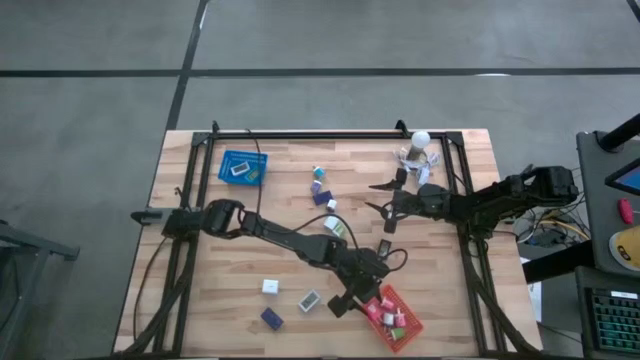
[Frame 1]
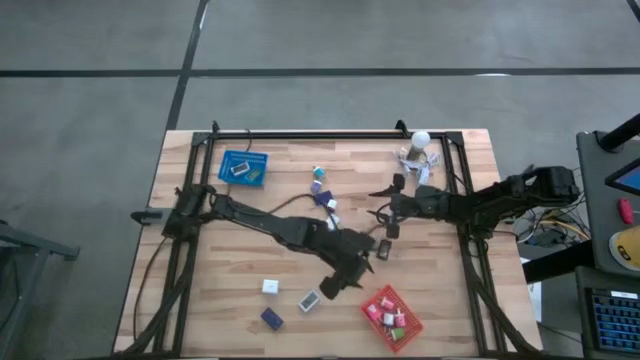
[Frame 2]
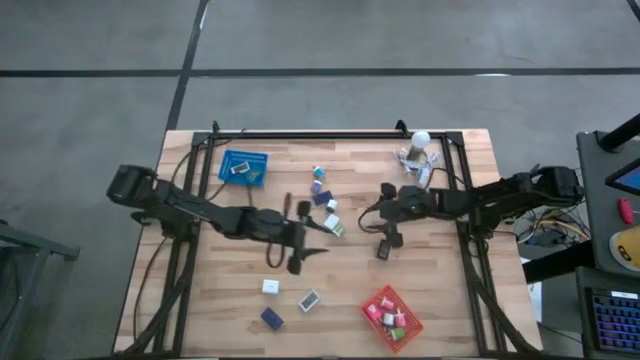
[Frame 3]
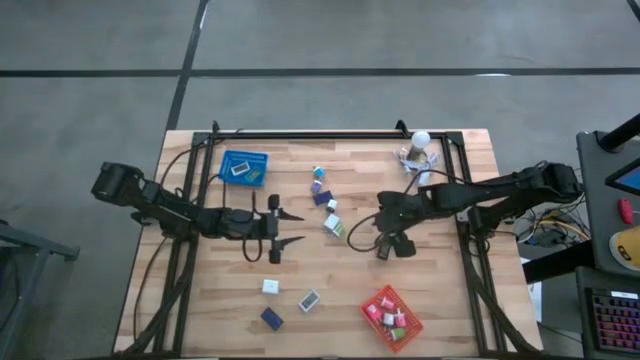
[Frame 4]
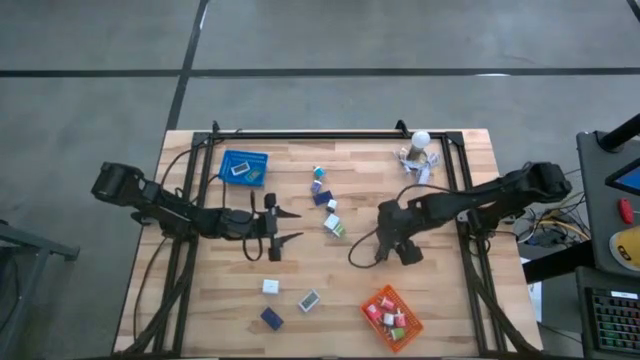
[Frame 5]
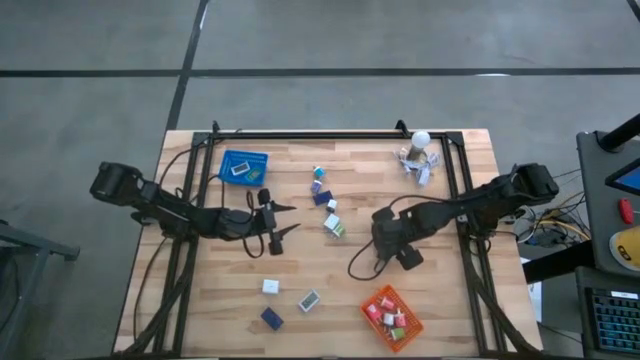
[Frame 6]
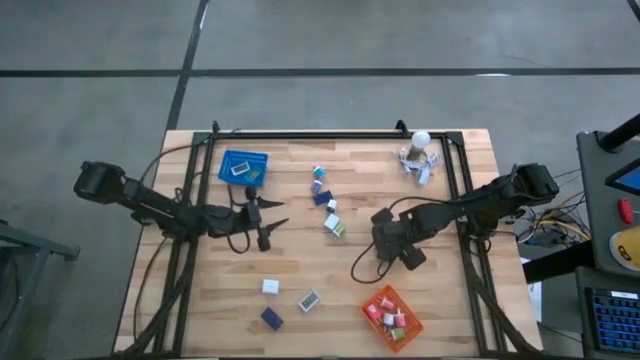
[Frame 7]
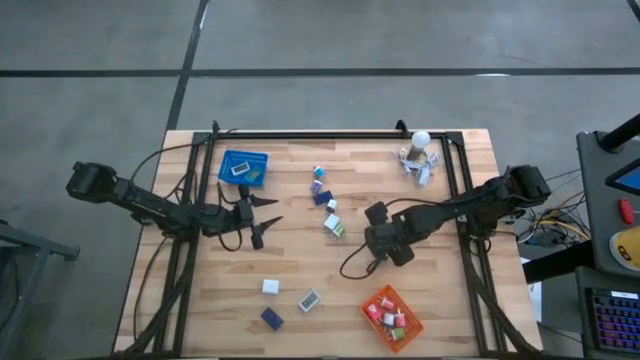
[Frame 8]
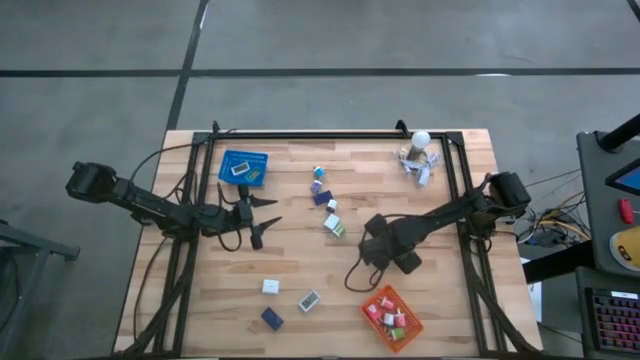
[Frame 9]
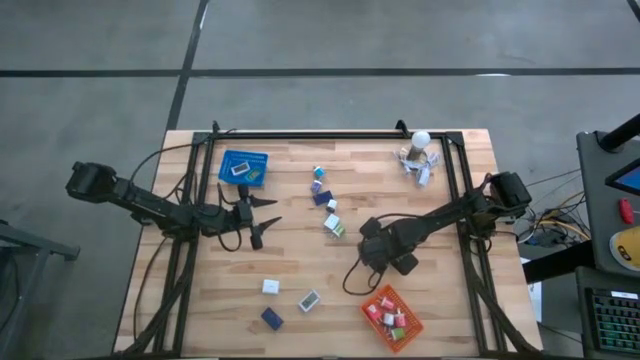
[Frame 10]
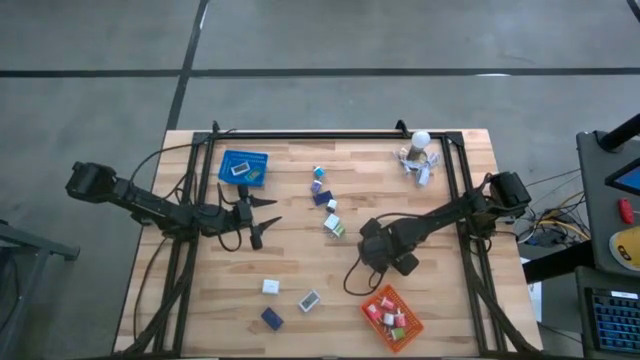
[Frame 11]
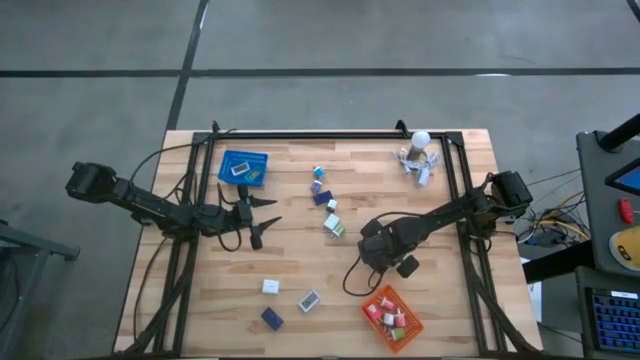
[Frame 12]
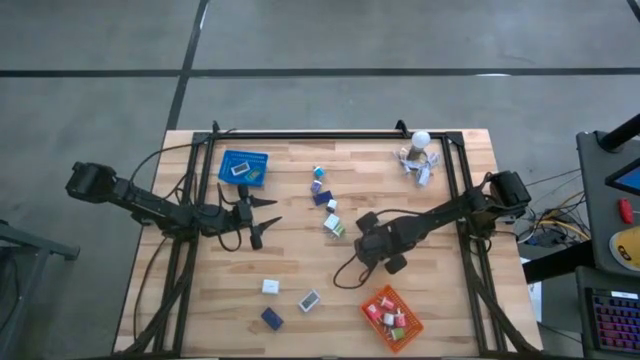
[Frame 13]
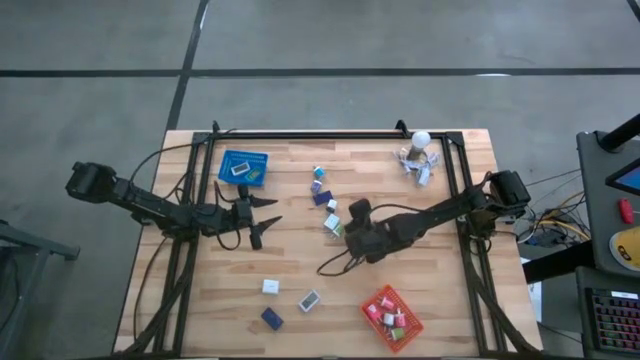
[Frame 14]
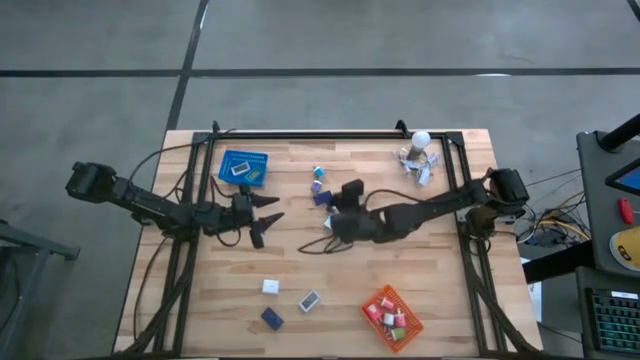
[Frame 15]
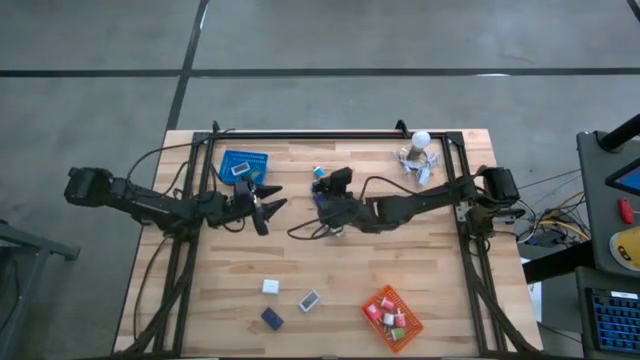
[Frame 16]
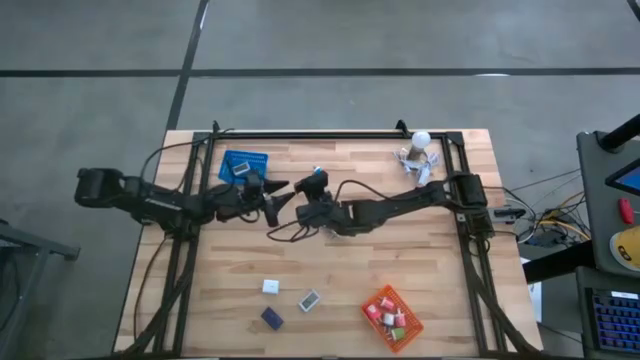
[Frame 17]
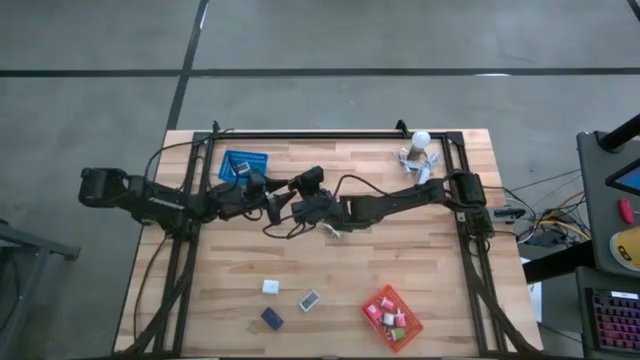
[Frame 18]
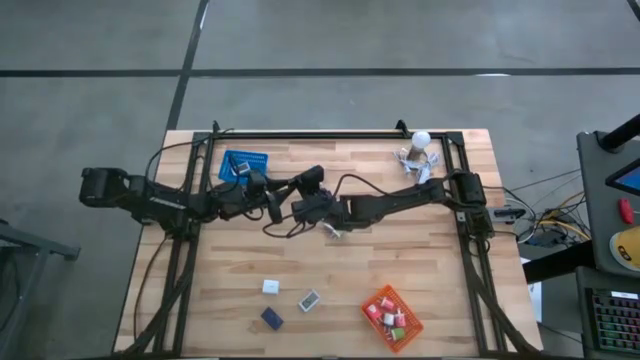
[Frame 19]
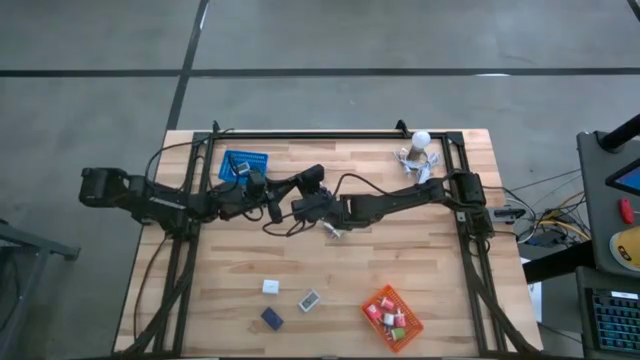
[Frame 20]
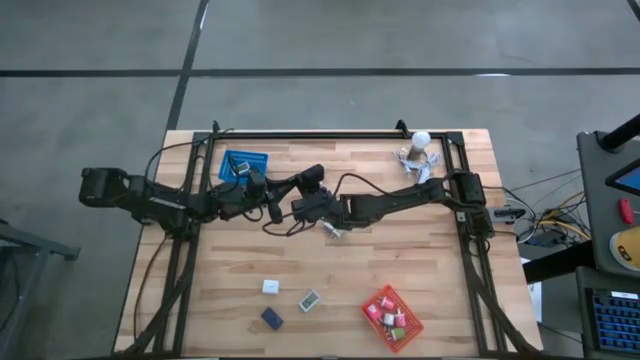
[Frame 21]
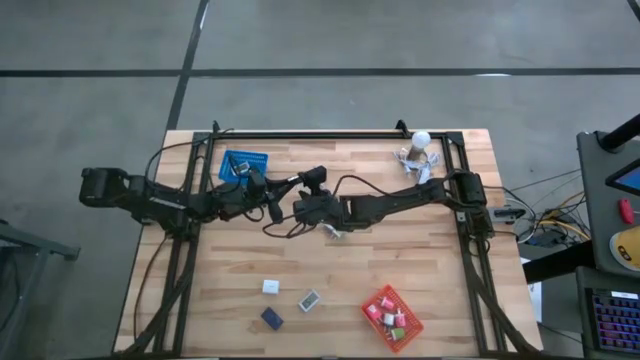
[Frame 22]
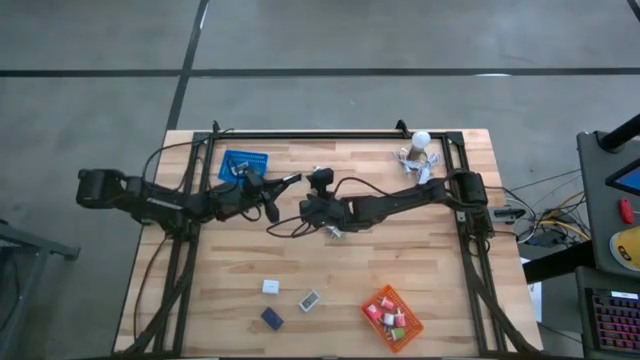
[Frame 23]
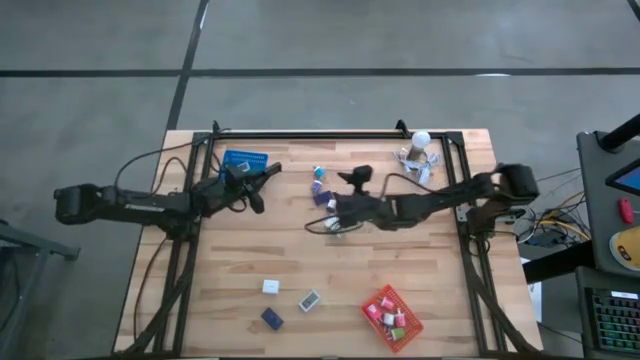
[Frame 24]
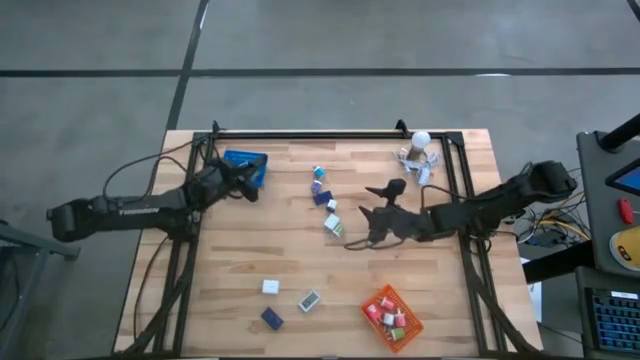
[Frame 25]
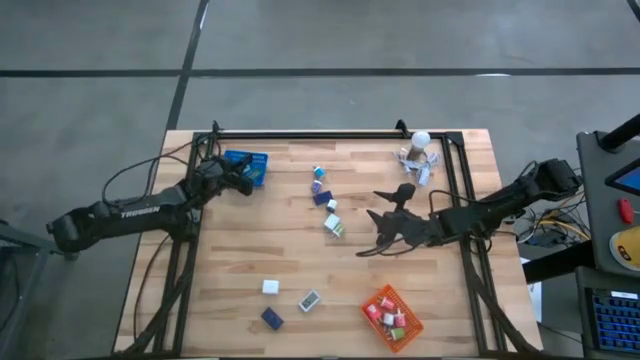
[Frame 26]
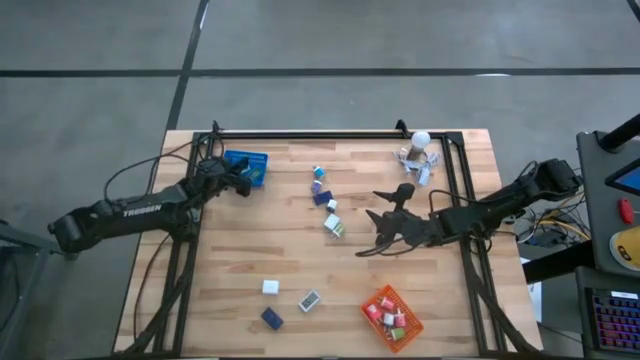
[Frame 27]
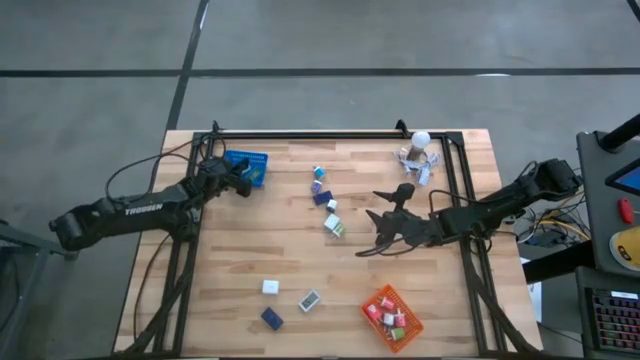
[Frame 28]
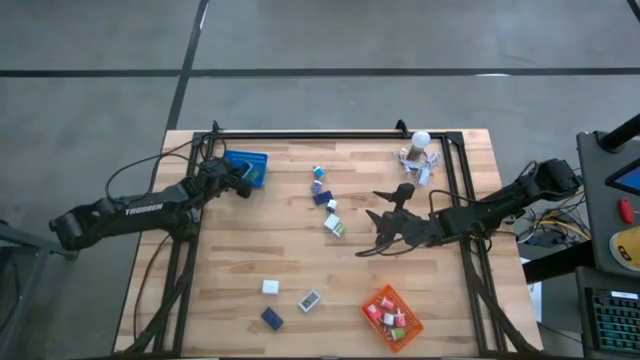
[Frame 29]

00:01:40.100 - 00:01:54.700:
Task: Pick & Place Office items
Put the black digital clock into the blue bin

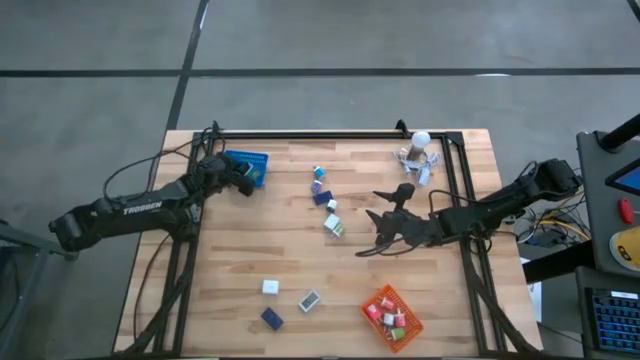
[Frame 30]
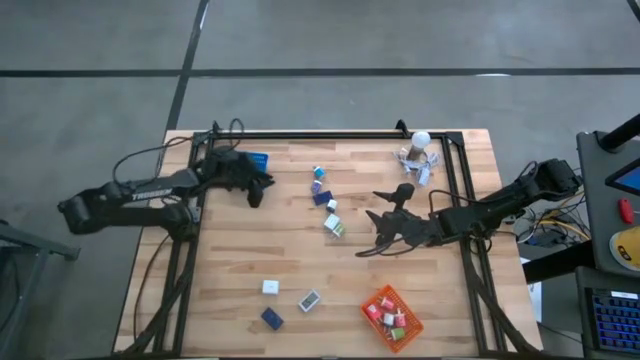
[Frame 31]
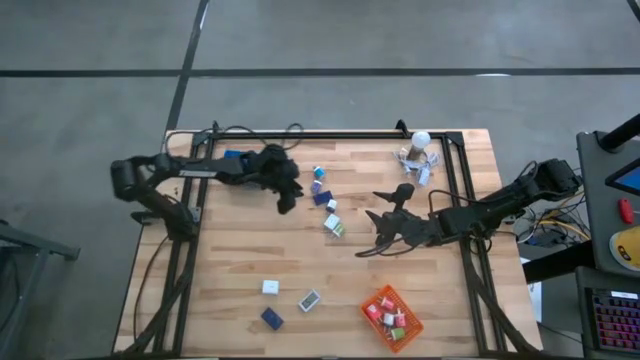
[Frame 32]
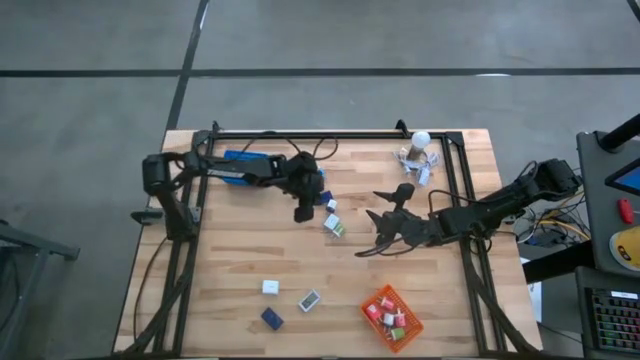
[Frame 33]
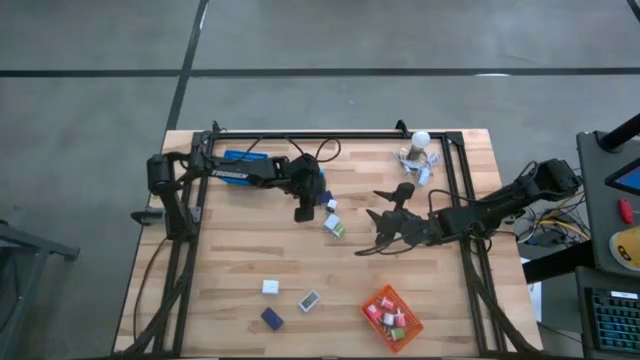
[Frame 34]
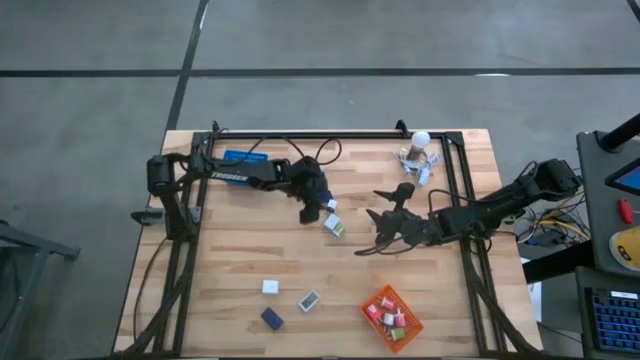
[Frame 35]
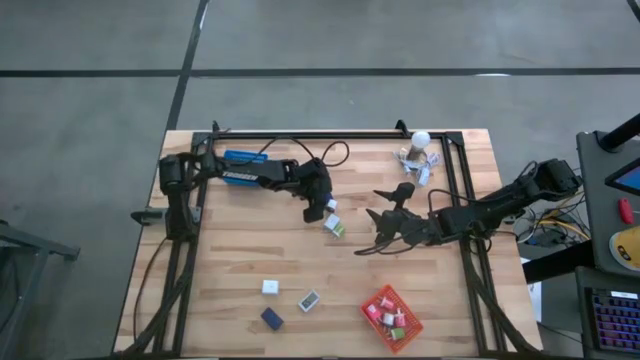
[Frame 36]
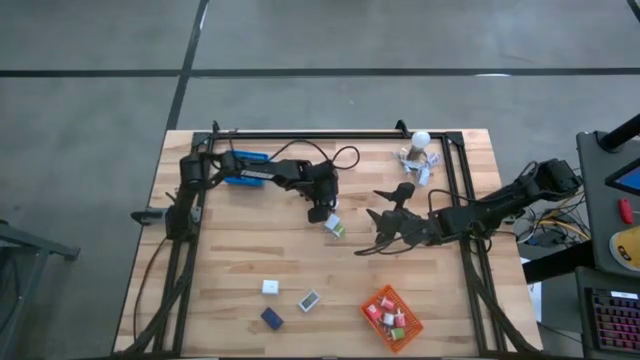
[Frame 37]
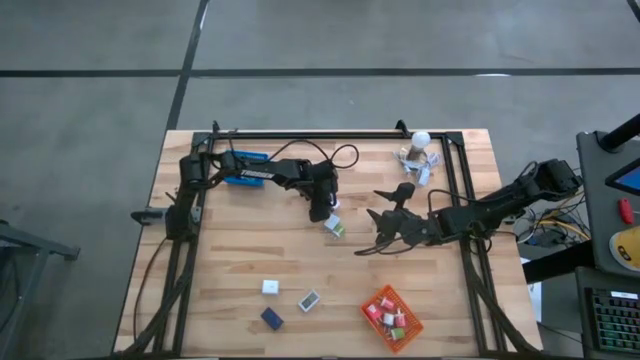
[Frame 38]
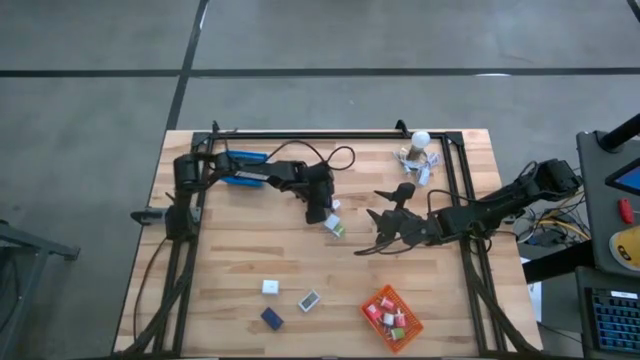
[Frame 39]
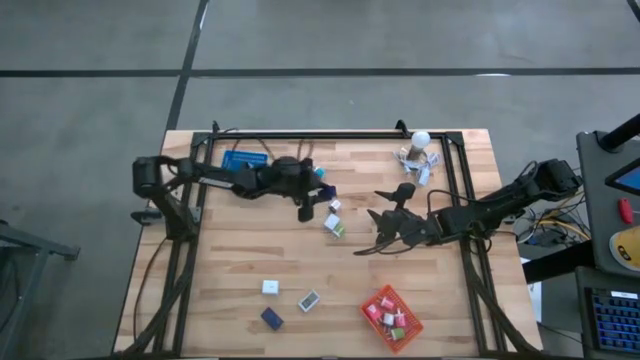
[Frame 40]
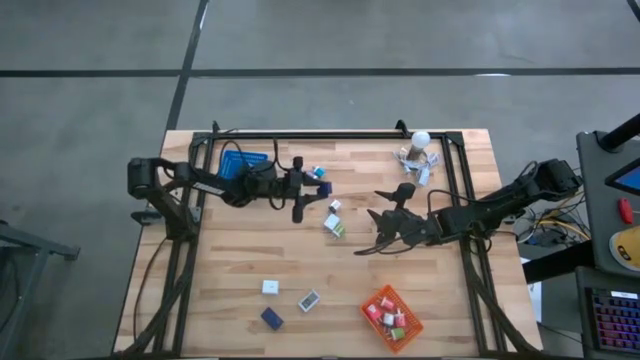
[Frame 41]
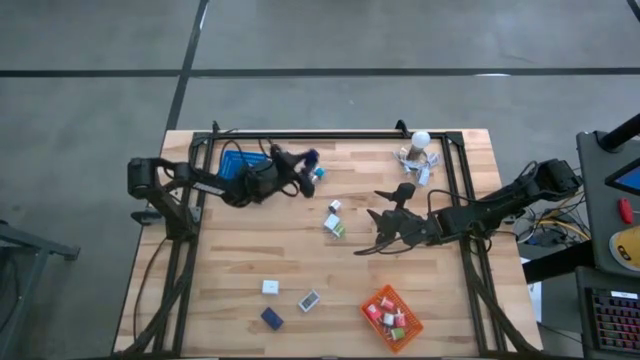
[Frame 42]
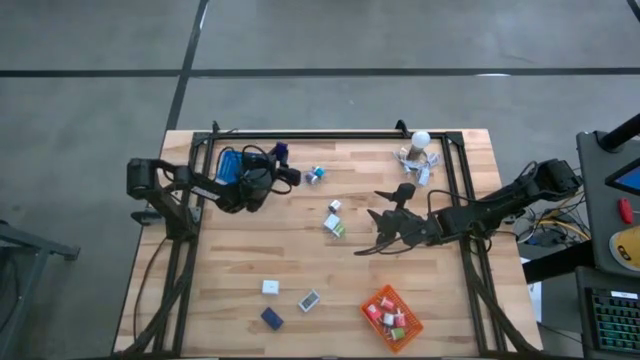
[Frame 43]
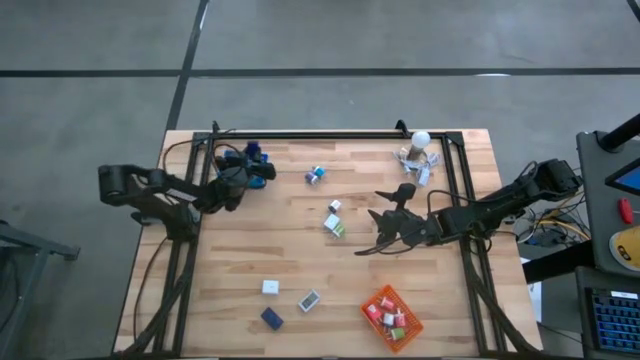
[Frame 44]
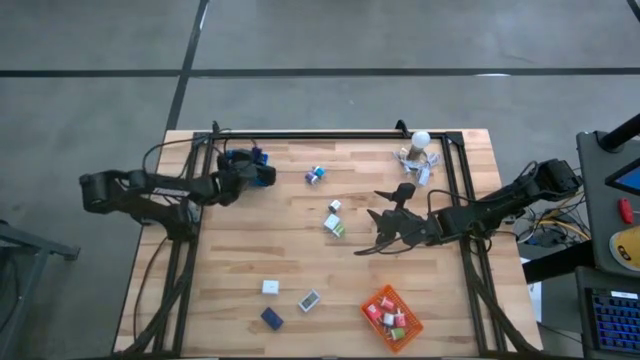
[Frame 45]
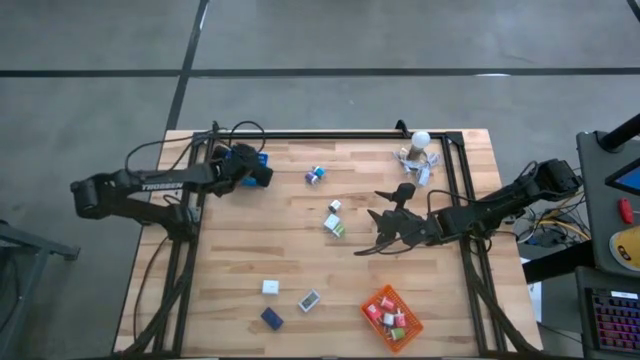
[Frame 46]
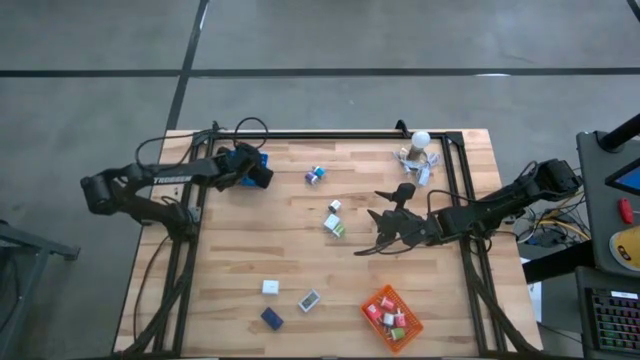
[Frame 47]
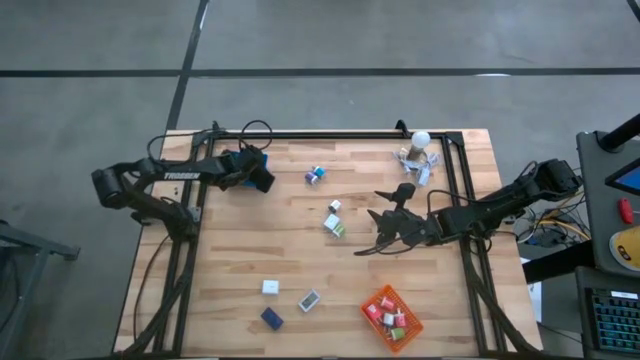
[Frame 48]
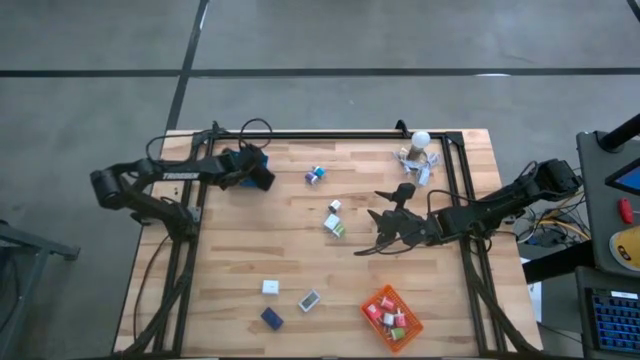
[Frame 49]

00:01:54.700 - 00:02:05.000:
Put the top dark blue digital clock into the blue bin
